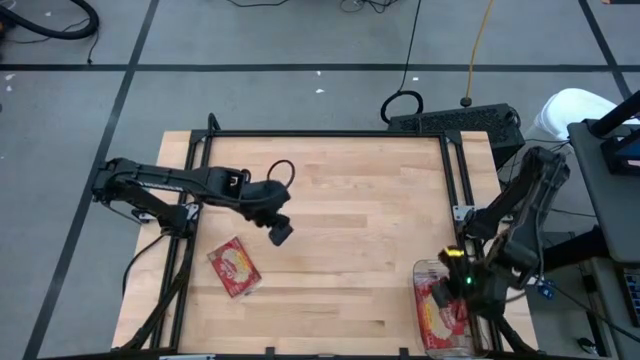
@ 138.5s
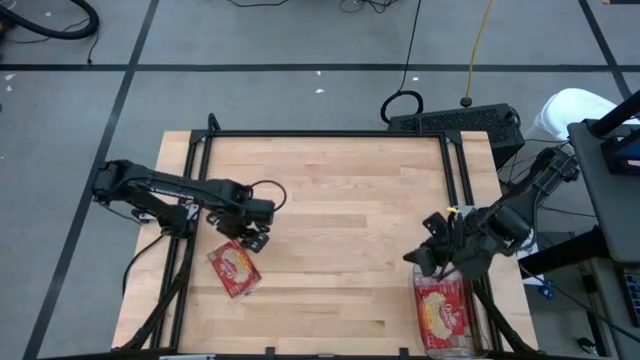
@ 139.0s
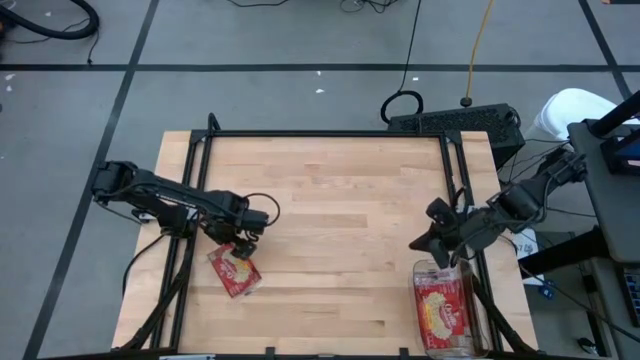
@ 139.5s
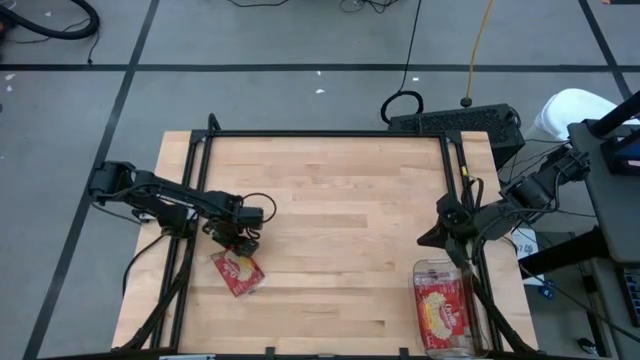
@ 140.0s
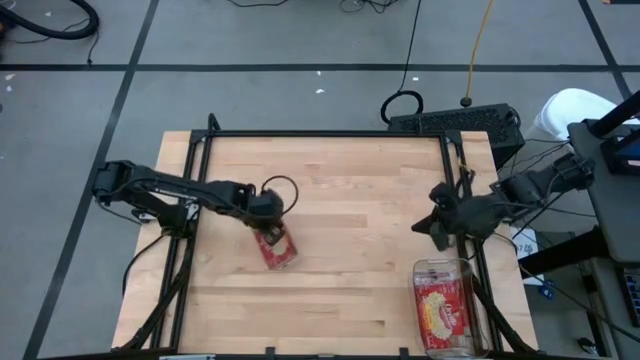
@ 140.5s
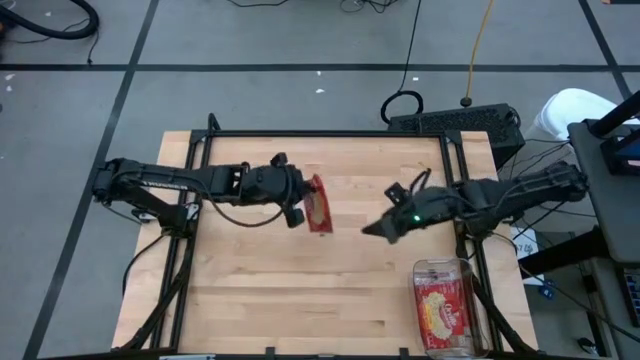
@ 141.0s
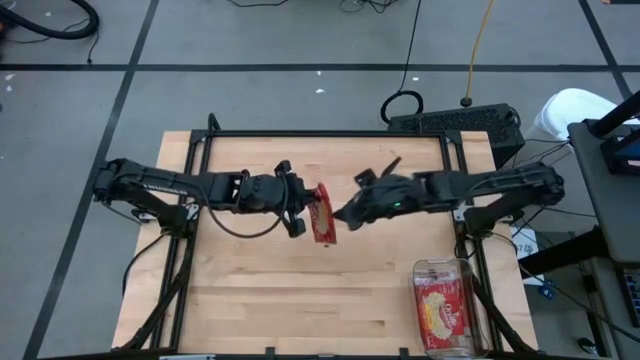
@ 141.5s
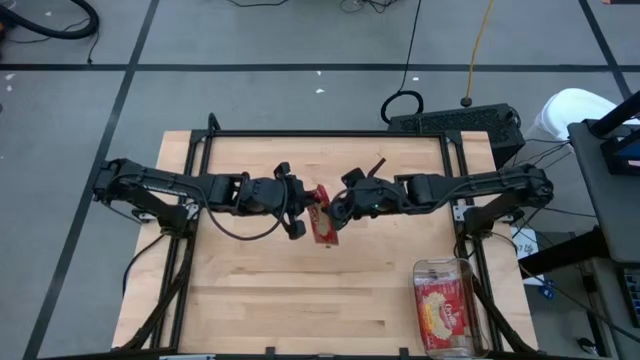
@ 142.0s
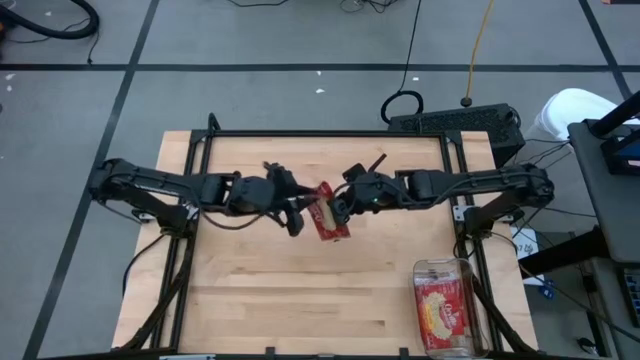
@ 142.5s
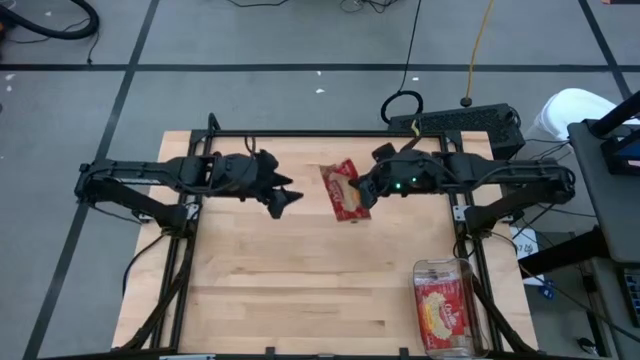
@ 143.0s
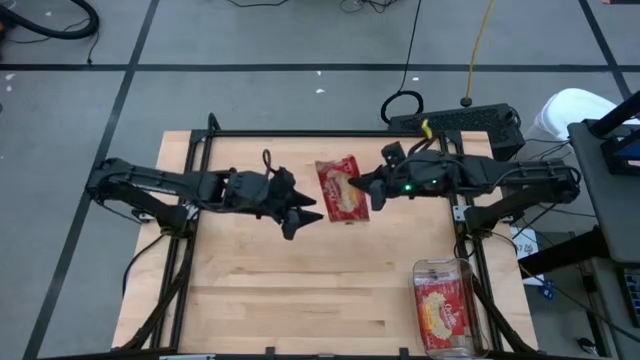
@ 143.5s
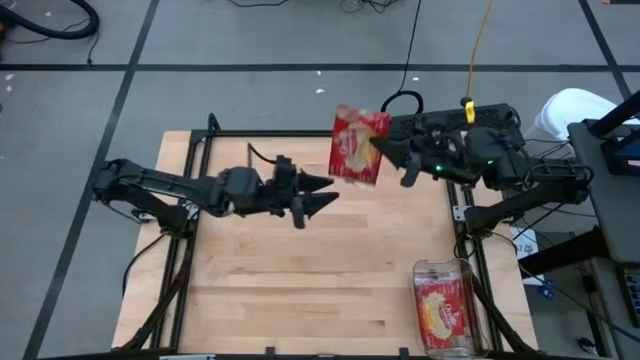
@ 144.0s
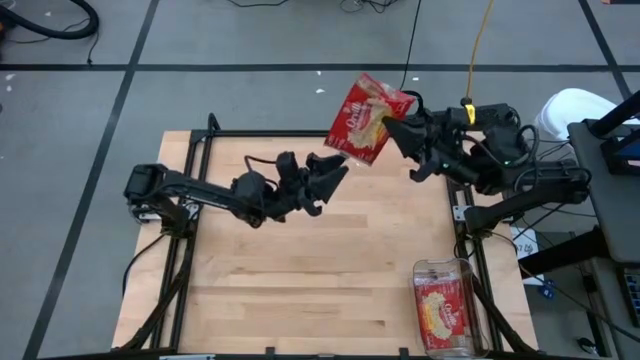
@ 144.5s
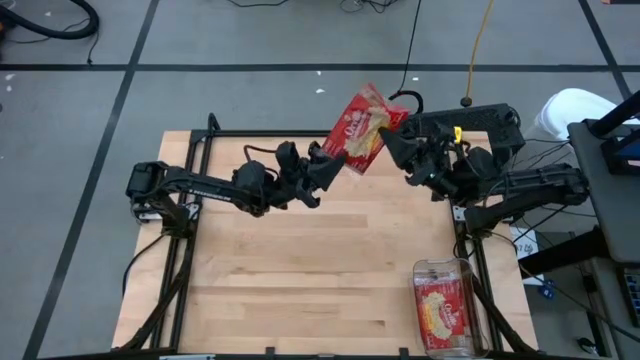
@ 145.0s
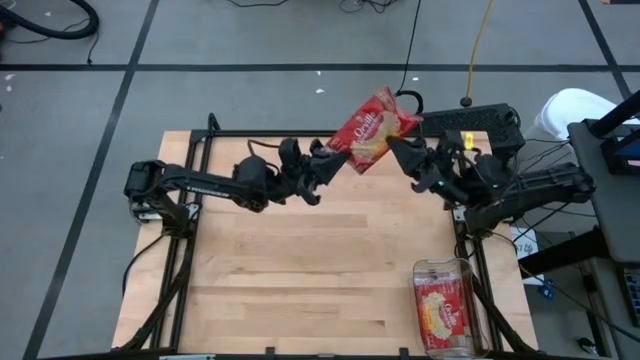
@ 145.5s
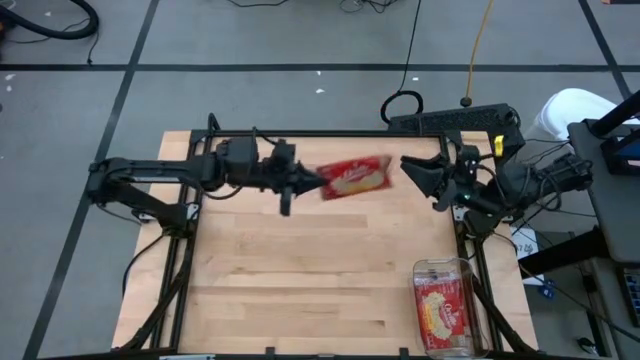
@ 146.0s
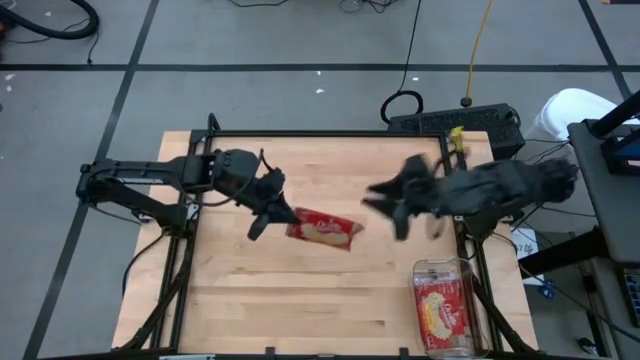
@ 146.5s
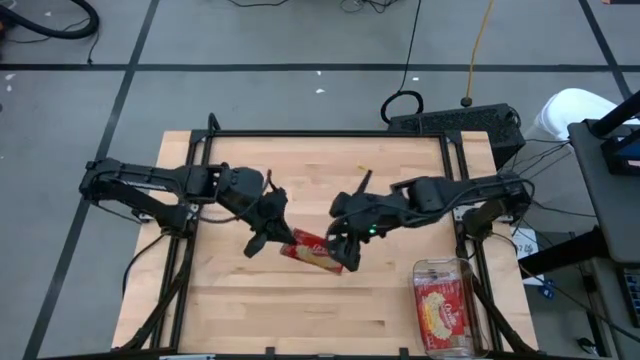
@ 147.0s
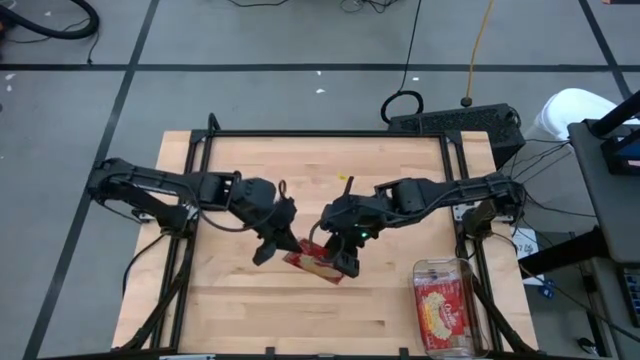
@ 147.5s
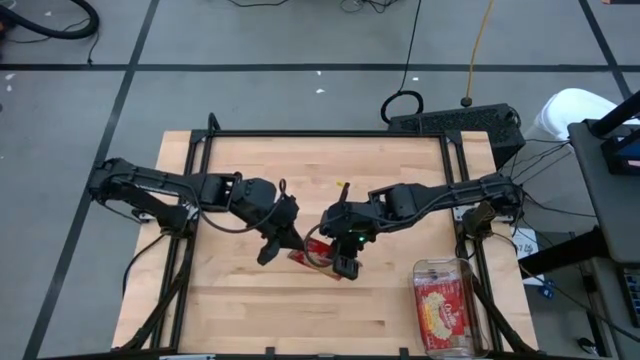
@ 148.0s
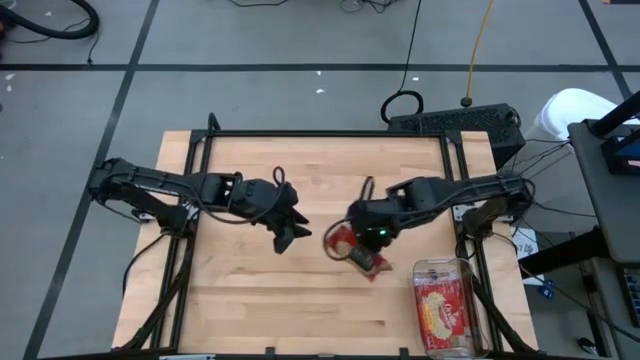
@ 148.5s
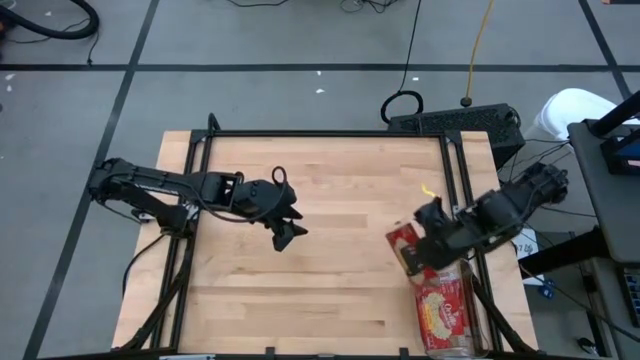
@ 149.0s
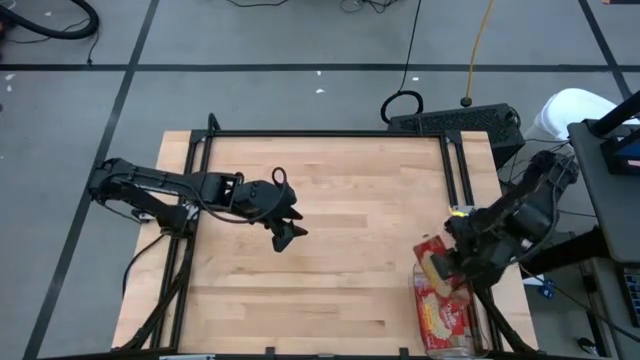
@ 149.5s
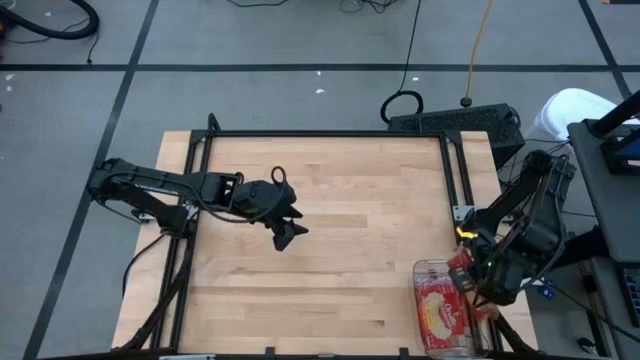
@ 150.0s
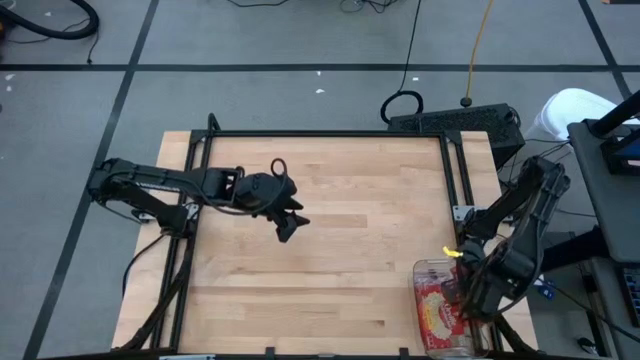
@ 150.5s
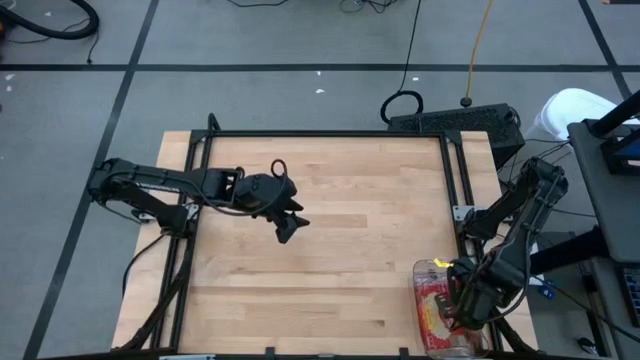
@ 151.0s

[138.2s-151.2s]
Task: Sort popcorn bags into baskets
Put the popcorn bag into the transparent bin

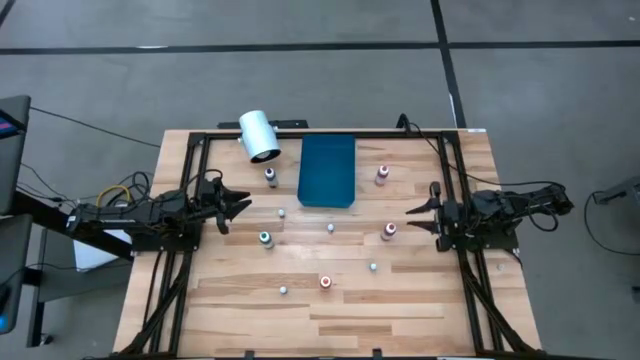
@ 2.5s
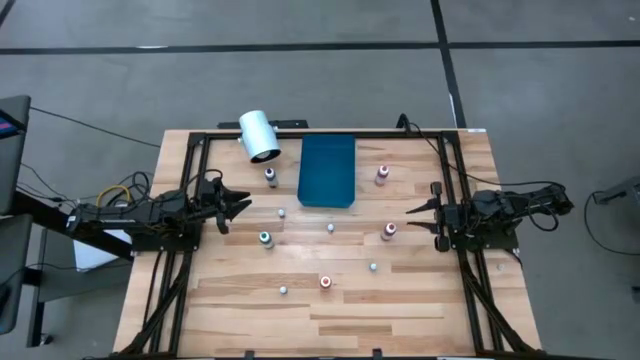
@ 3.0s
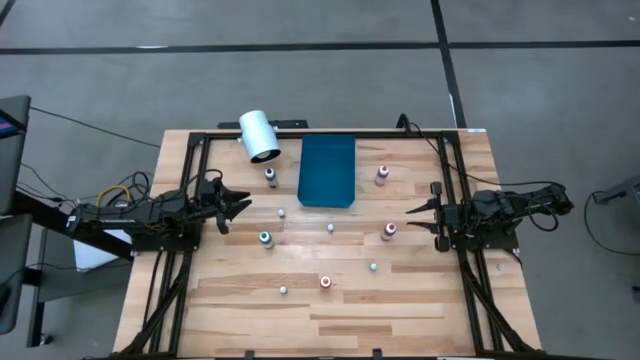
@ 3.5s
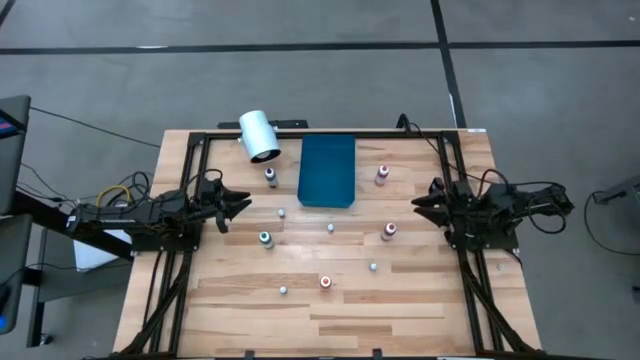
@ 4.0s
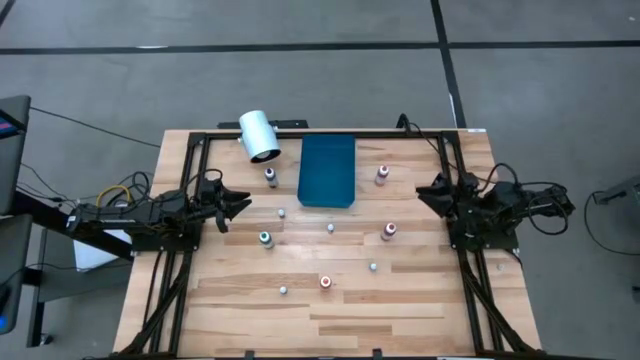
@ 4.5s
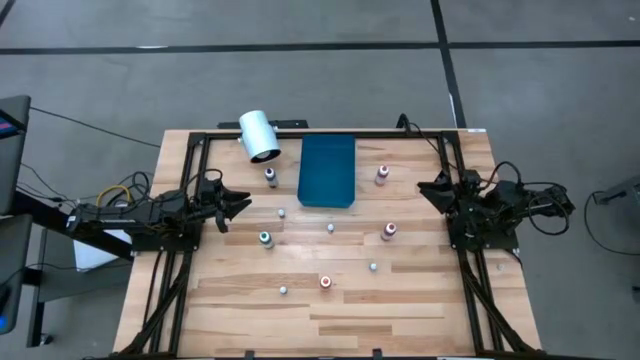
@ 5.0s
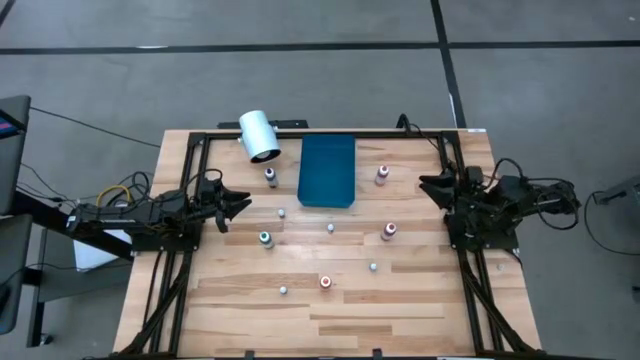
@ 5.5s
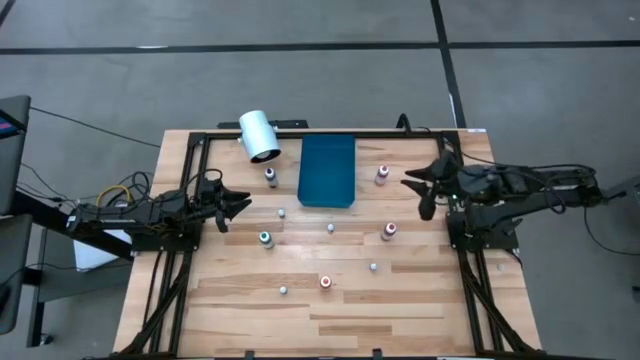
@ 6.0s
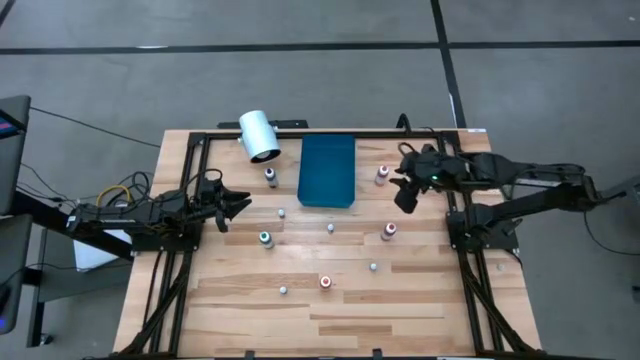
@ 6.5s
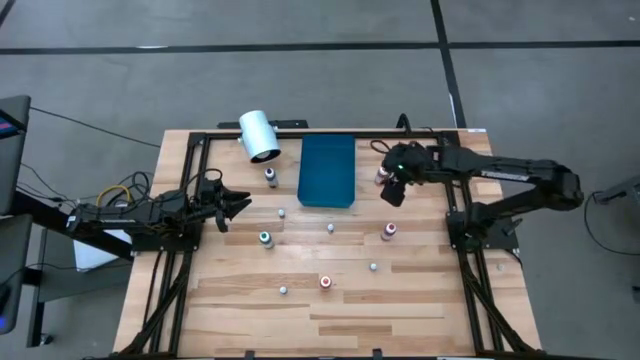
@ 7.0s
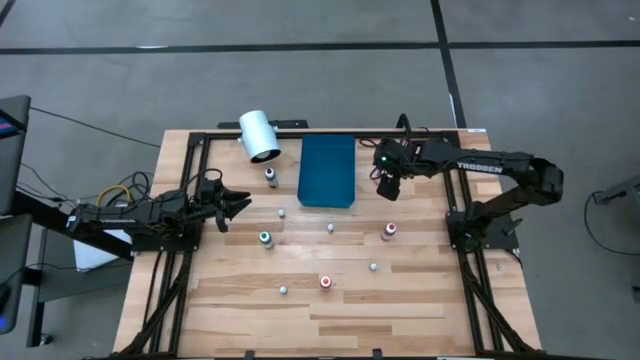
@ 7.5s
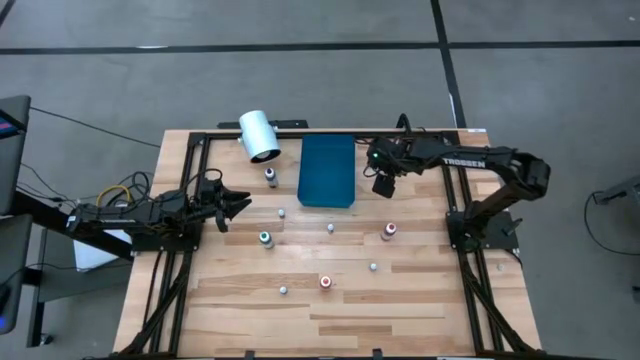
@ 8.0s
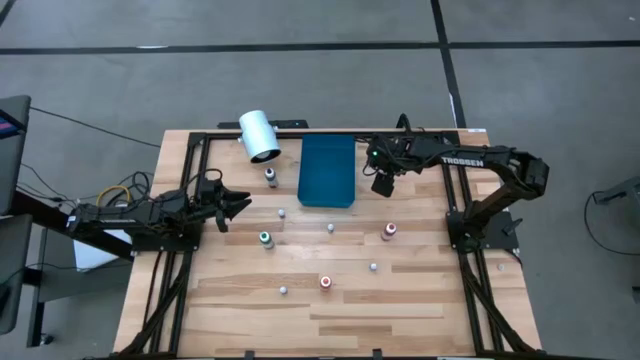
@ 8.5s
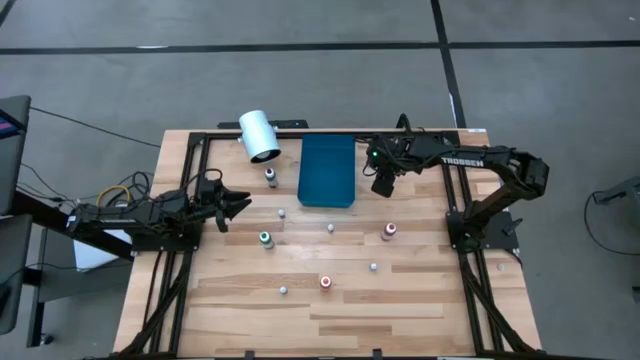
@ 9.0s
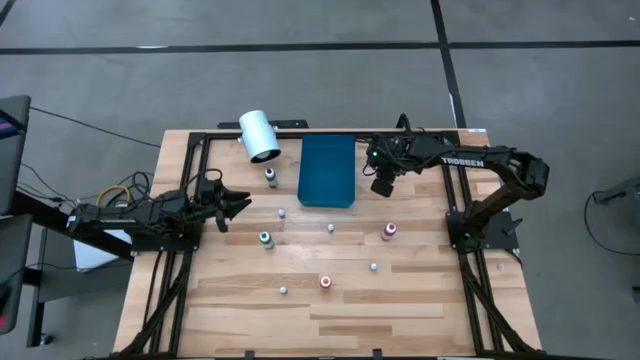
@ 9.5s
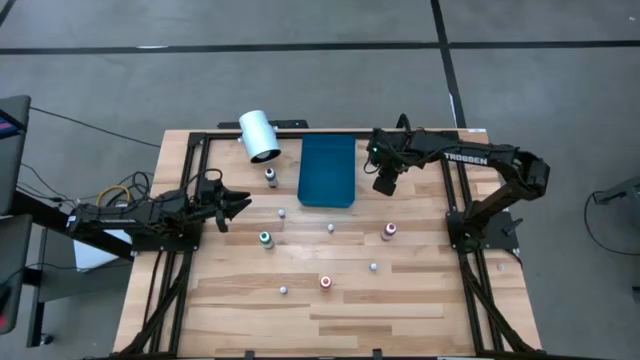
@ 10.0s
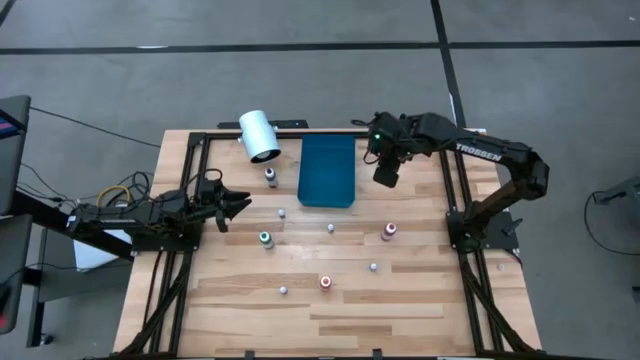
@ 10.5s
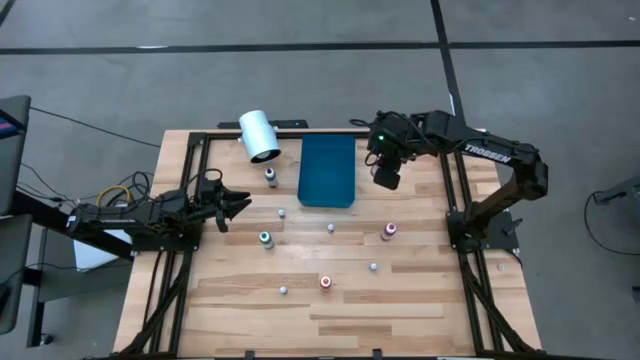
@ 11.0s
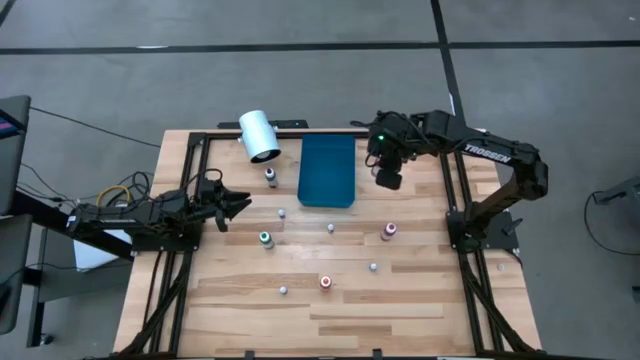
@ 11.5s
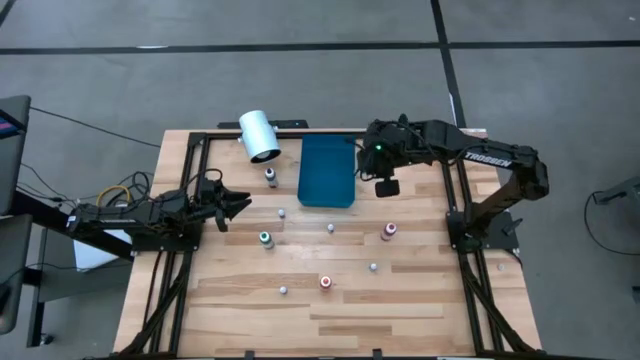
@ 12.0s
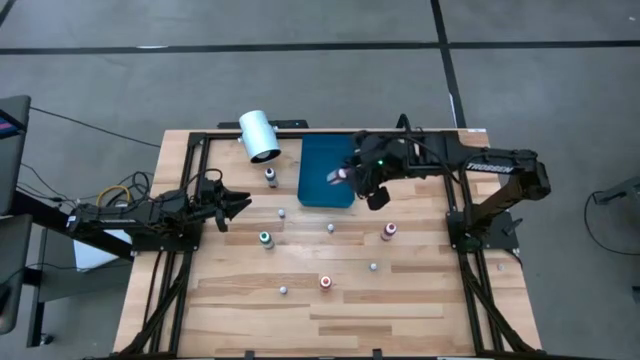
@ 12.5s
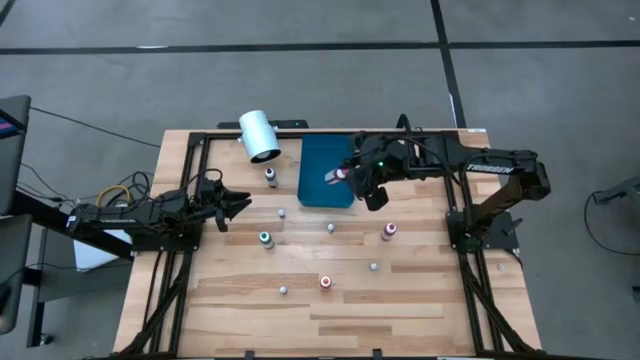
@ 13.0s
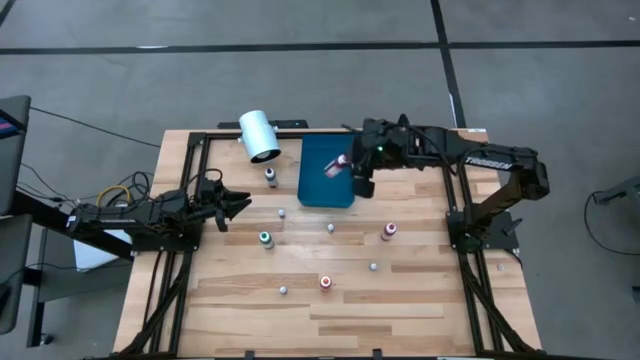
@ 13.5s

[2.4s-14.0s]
Task: Pick & Place food coloring
Put the large pink food coloring bottle into the blue bin
